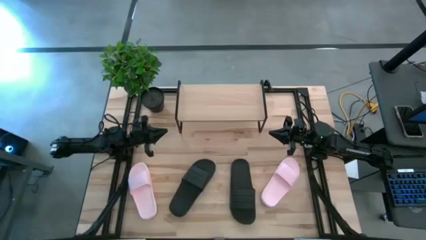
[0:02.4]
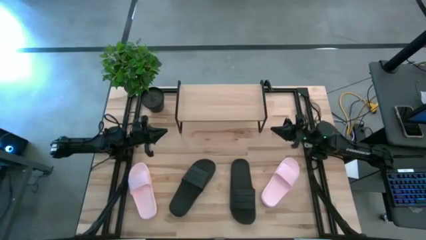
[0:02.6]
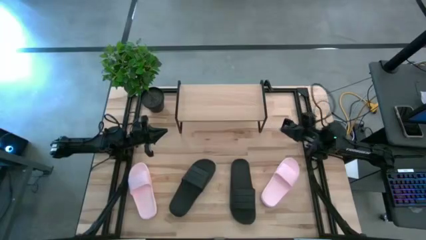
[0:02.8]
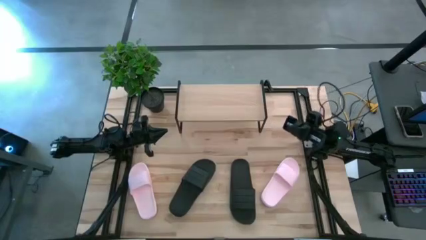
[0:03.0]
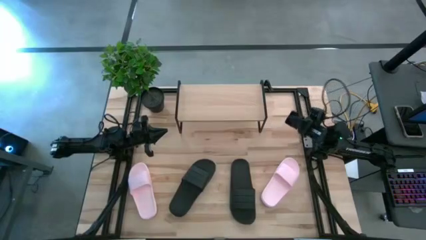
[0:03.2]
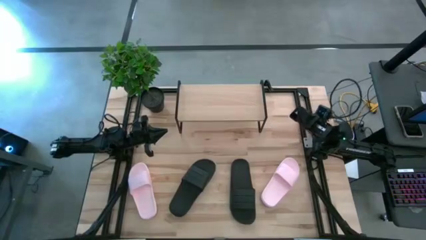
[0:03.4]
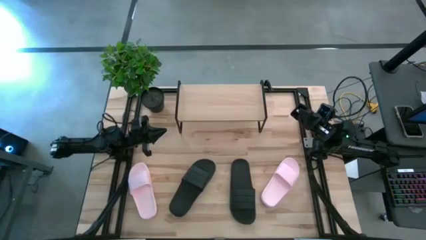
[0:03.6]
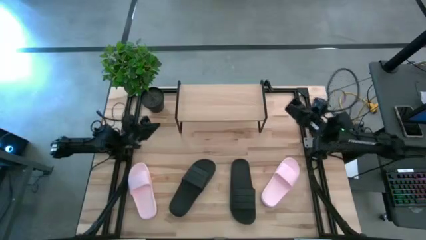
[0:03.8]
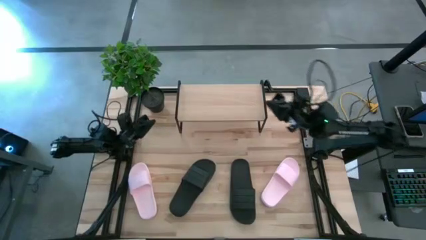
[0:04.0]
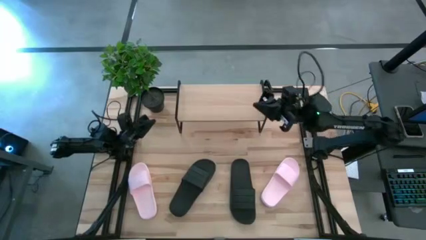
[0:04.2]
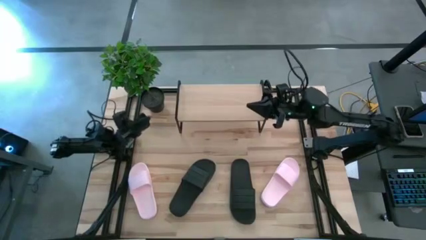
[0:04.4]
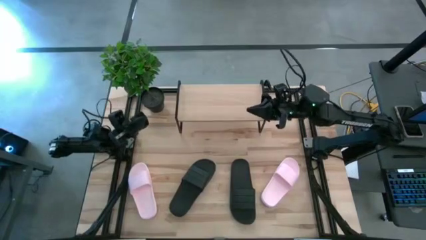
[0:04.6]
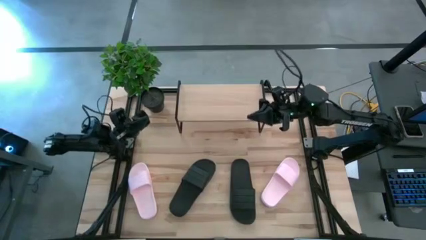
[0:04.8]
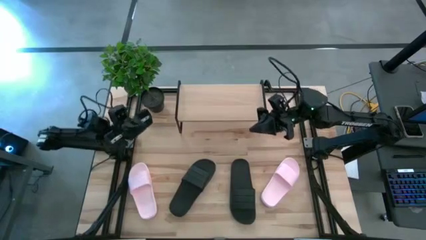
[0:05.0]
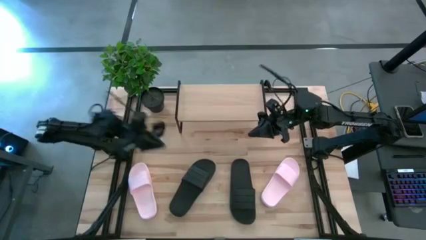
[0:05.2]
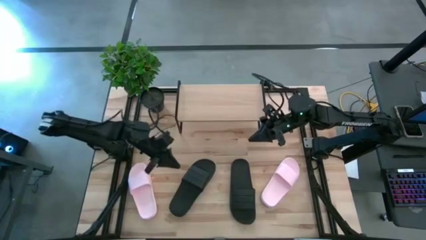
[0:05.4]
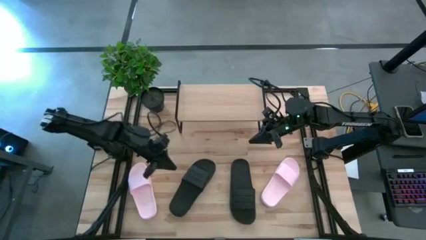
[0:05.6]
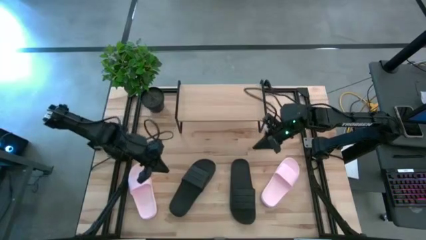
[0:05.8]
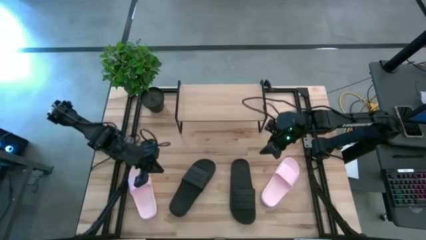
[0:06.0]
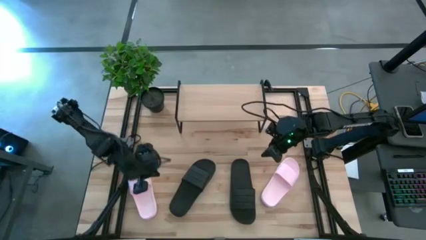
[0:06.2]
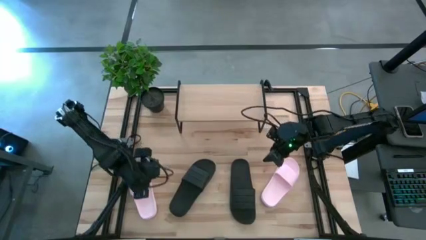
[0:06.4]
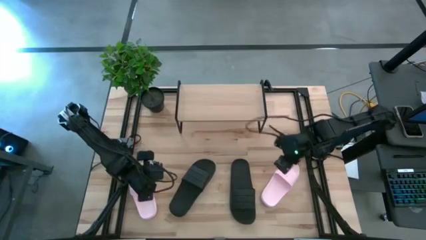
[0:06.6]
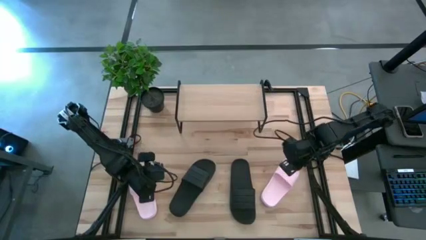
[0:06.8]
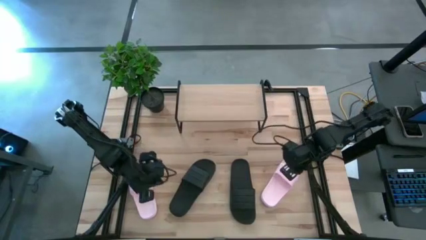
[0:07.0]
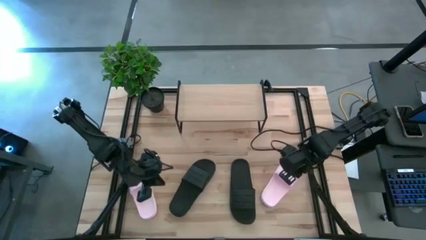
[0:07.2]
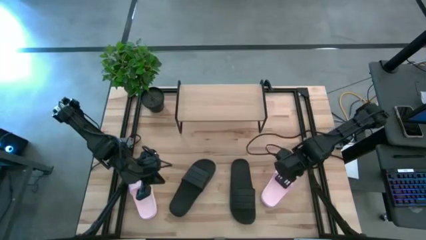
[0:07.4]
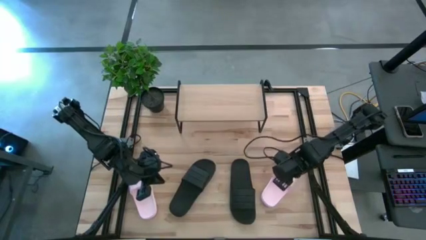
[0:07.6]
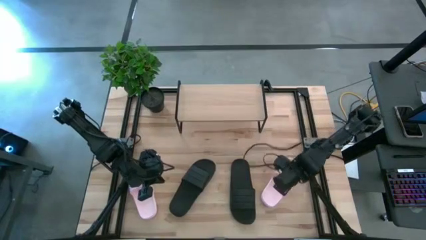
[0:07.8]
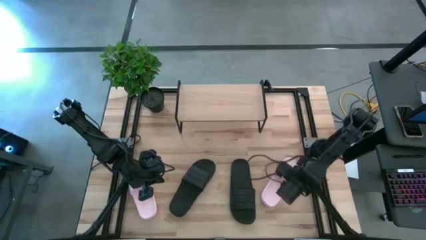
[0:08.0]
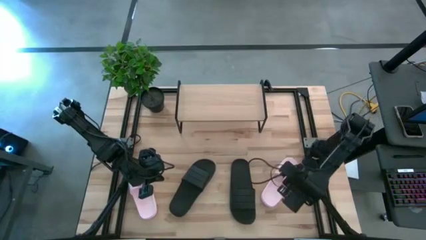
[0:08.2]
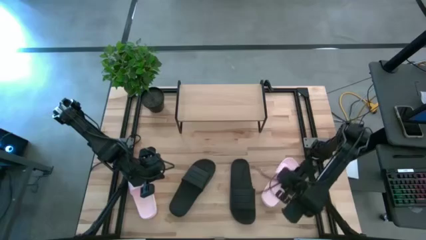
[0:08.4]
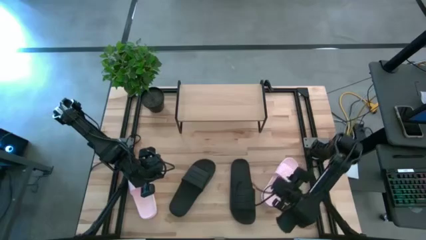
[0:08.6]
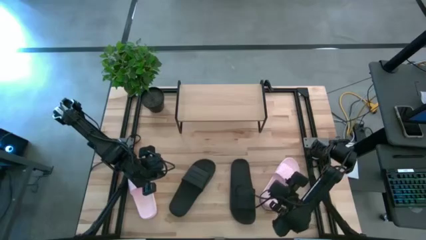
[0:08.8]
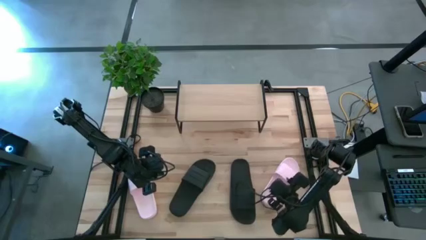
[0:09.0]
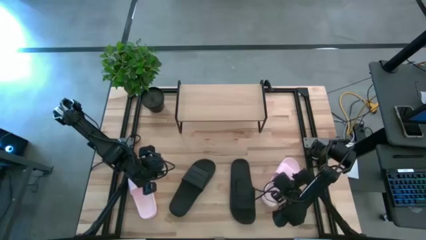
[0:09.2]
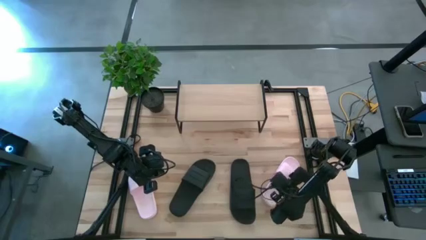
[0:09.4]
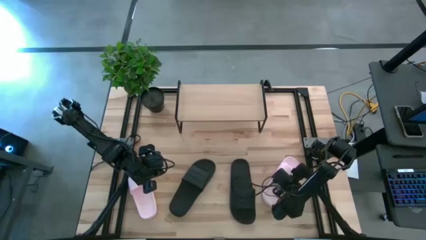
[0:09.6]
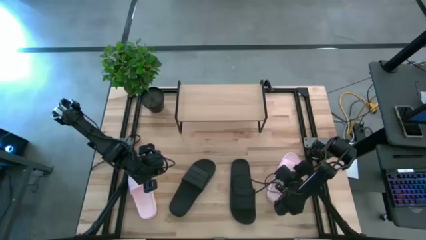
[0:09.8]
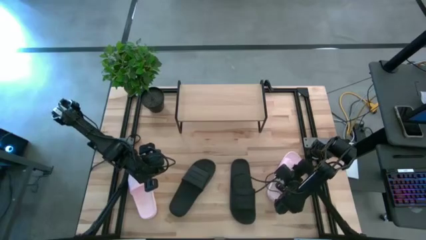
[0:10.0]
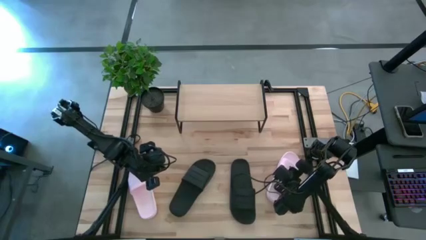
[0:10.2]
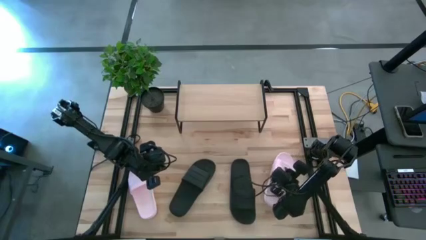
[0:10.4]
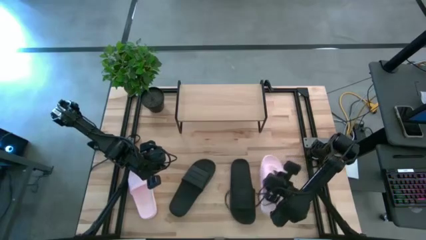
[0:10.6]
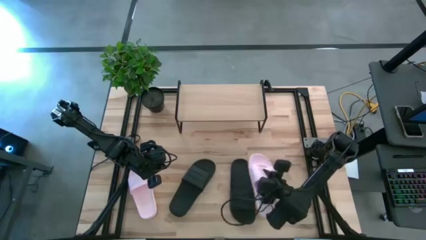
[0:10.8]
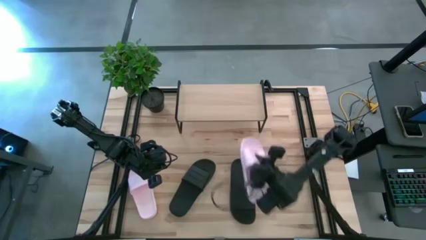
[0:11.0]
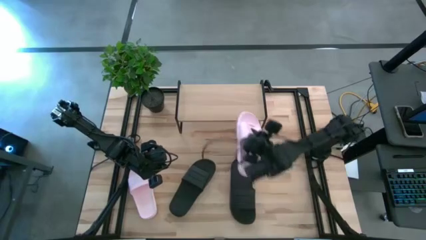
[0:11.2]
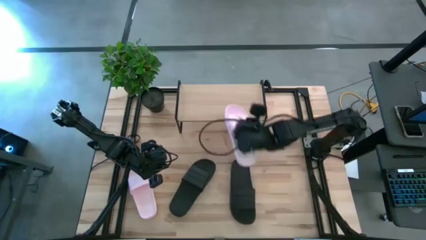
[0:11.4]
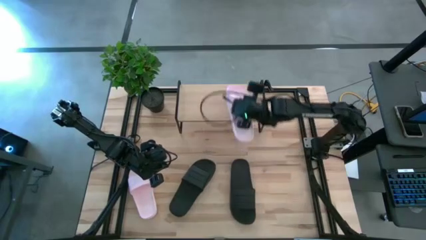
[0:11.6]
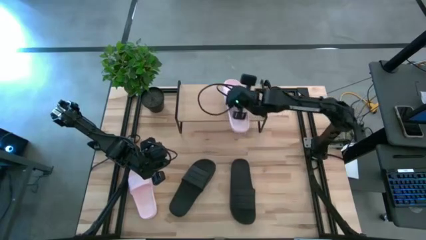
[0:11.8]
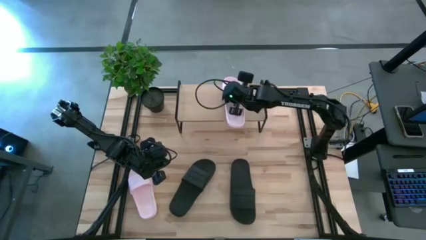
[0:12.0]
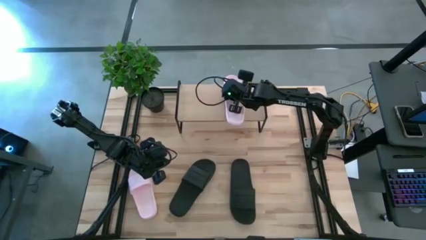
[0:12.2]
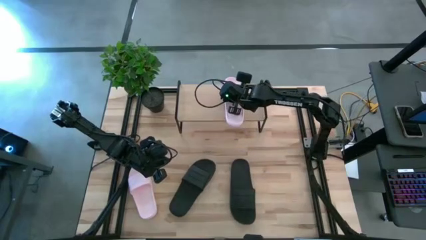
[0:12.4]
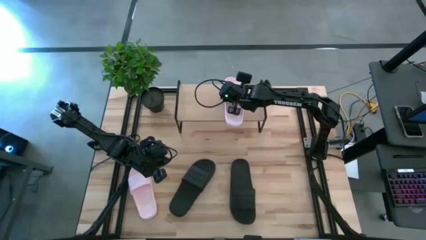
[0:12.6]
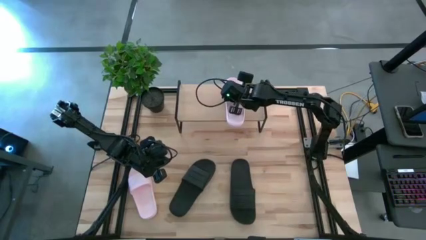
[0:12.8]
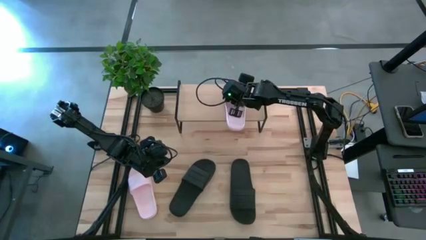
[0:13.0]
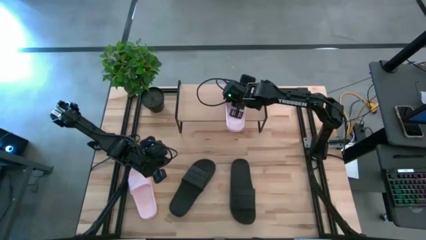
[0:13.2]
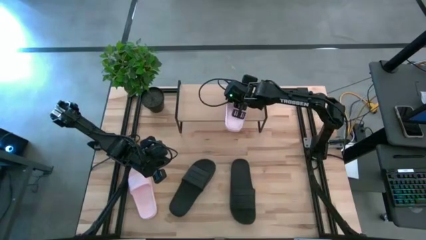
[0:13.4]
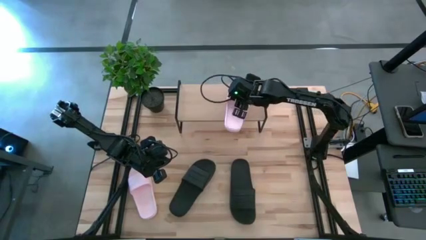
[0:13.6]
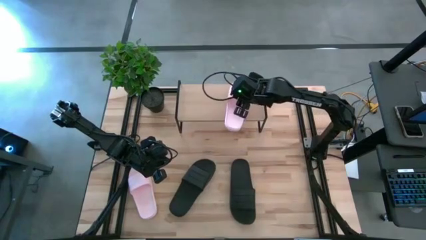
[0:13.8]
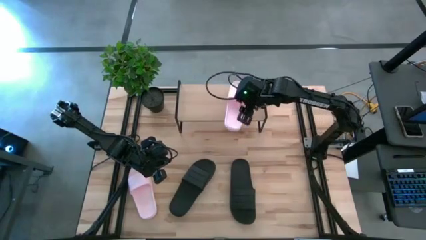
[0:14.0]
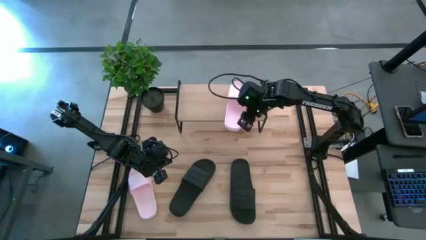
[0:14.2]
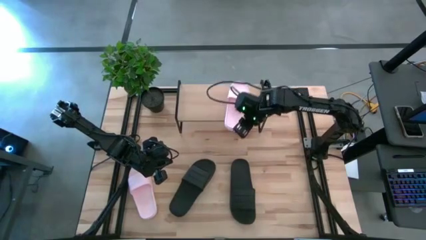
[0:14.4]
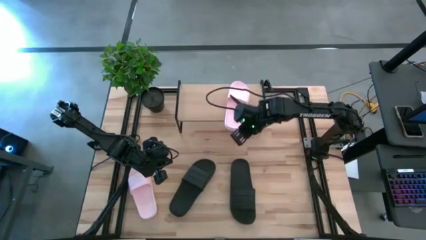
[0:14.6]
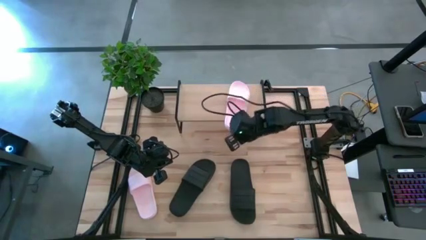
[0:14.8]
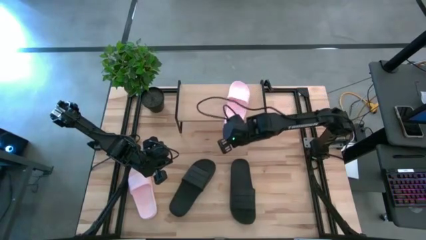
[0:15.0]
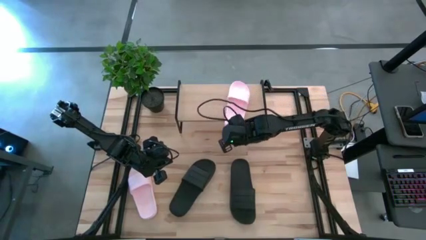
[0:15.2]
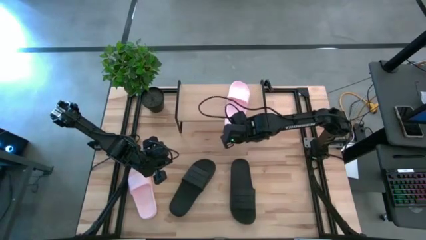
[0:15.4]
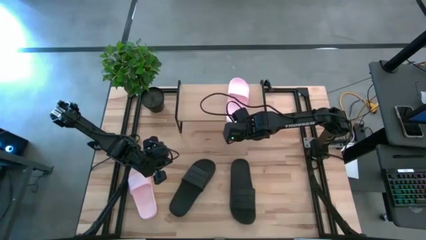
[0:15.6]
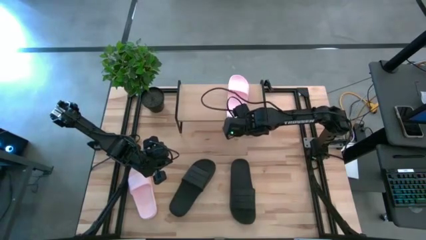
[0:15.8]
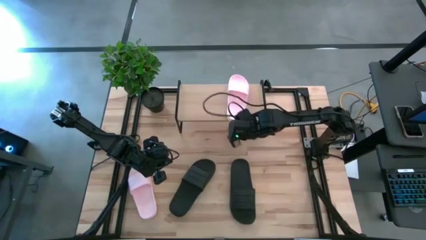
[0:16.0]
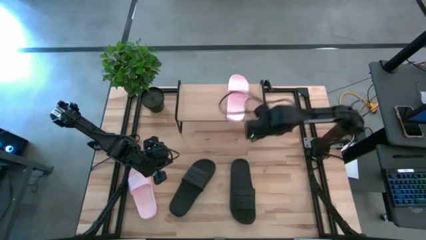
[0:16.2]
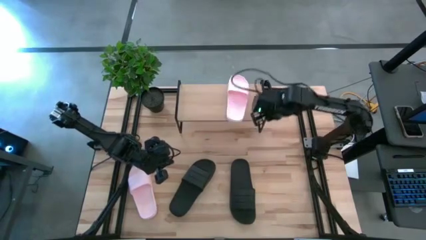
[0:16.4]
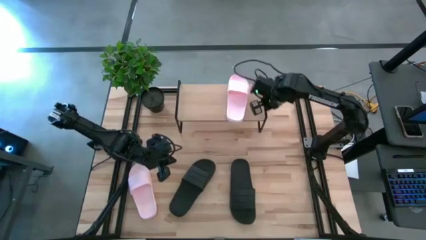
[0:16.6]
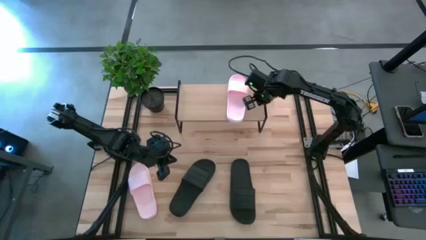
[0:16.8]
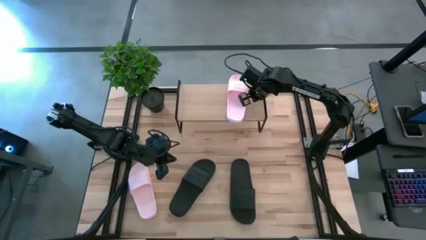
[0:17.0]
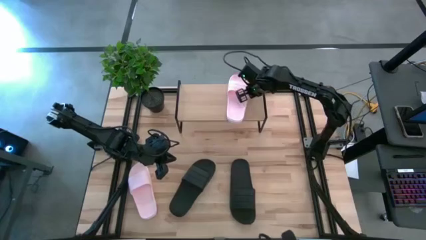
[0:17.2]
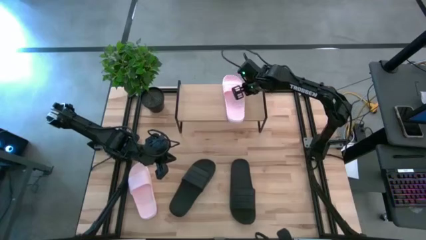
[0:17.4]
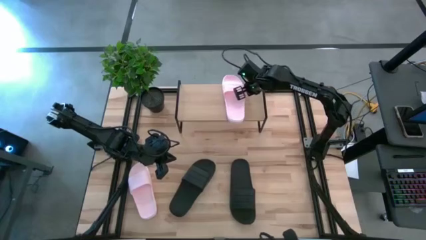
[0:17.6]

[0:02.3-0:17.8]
Task: Pick and place slides into the shelf
Put the right pink slipper on the shelf
